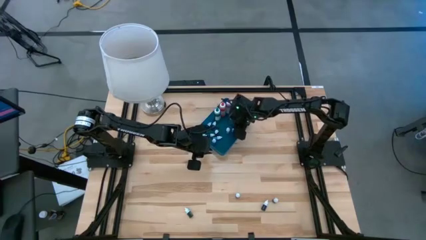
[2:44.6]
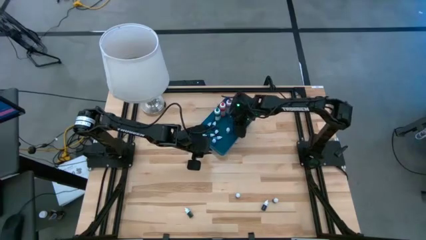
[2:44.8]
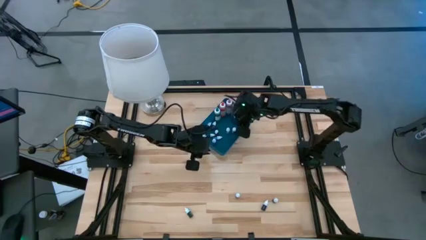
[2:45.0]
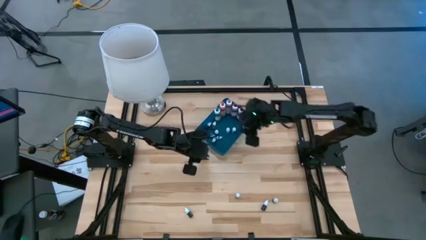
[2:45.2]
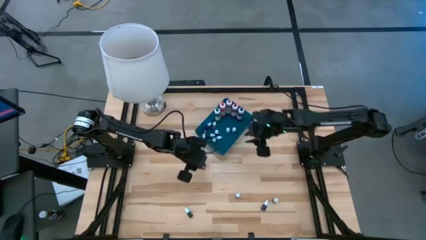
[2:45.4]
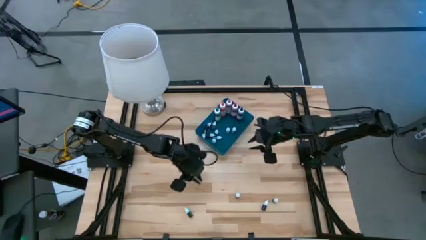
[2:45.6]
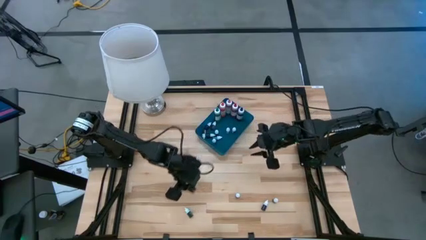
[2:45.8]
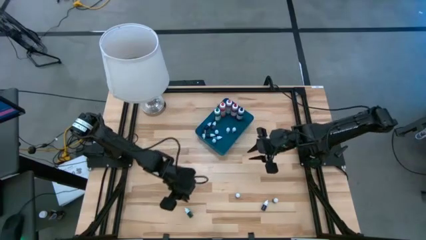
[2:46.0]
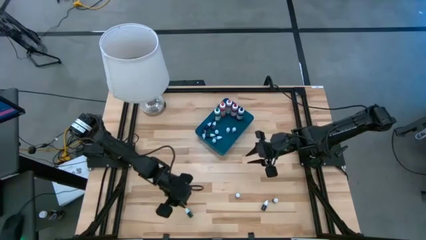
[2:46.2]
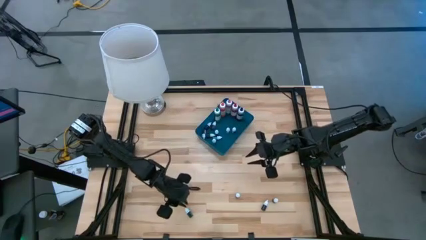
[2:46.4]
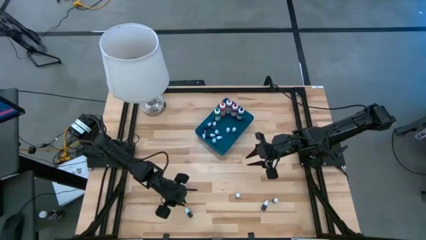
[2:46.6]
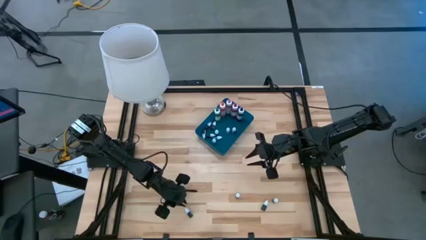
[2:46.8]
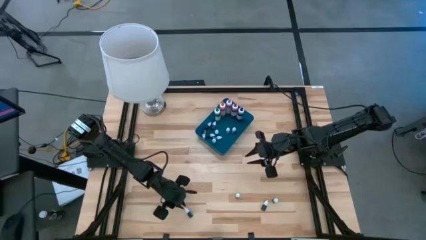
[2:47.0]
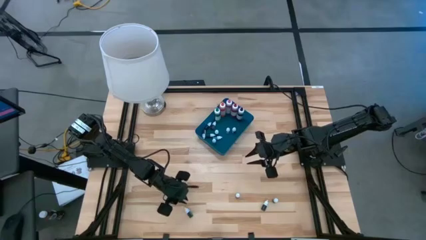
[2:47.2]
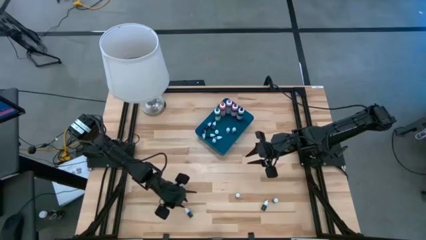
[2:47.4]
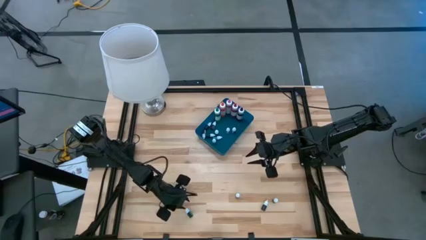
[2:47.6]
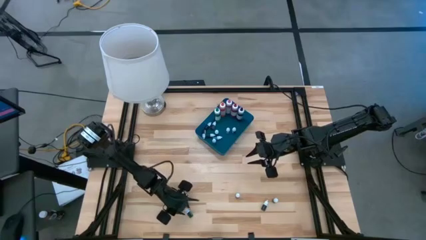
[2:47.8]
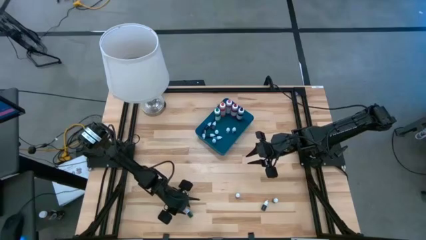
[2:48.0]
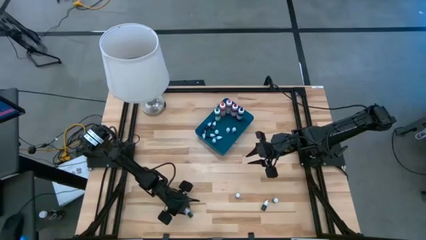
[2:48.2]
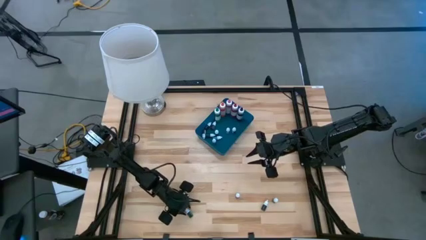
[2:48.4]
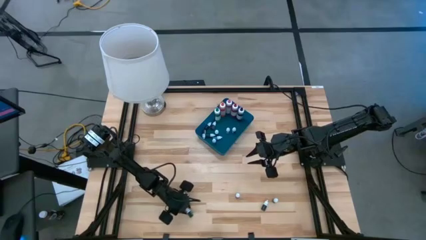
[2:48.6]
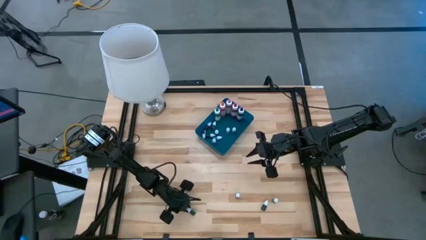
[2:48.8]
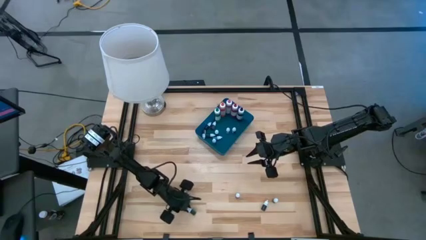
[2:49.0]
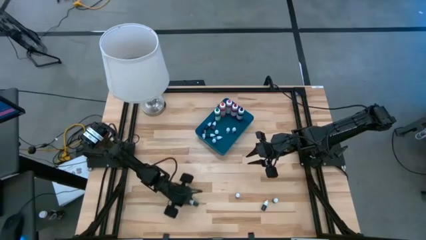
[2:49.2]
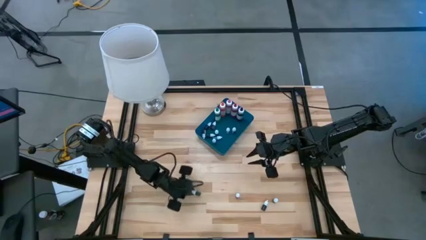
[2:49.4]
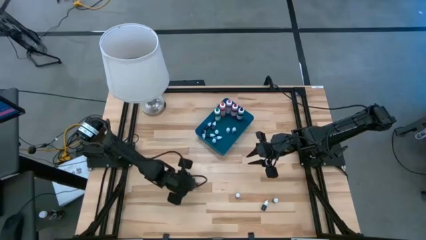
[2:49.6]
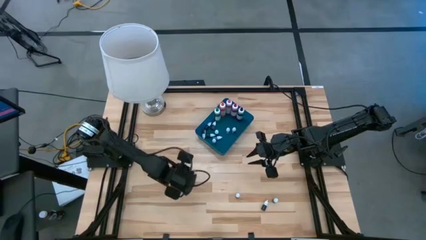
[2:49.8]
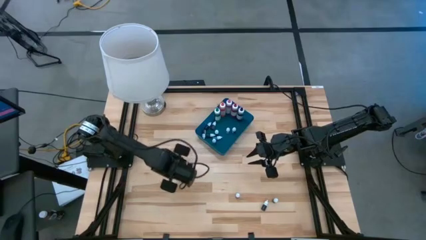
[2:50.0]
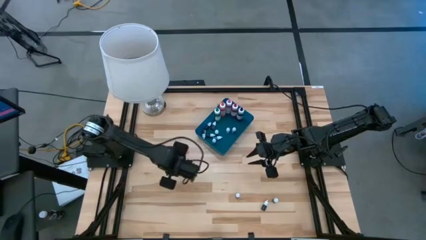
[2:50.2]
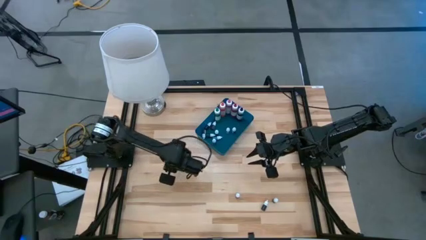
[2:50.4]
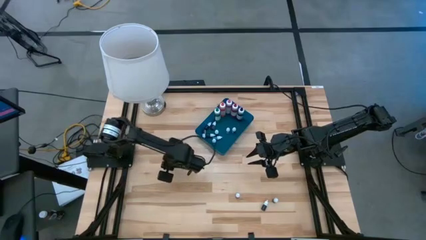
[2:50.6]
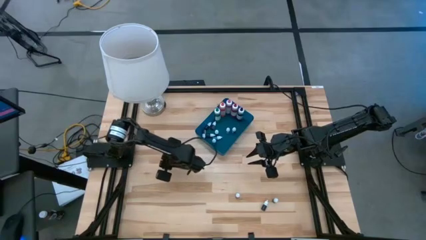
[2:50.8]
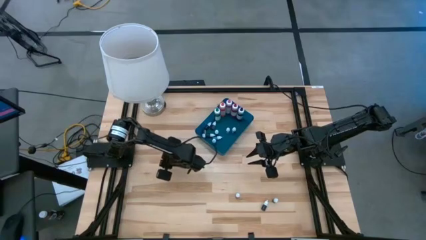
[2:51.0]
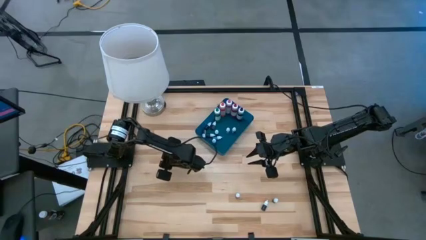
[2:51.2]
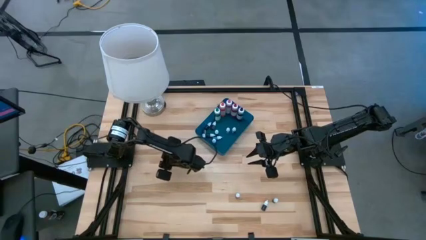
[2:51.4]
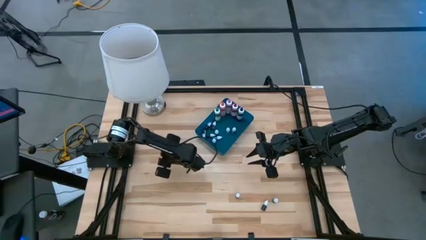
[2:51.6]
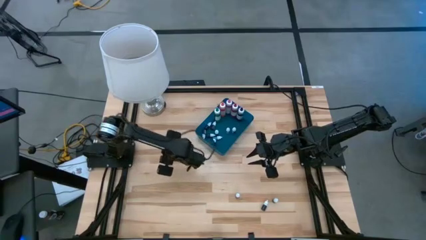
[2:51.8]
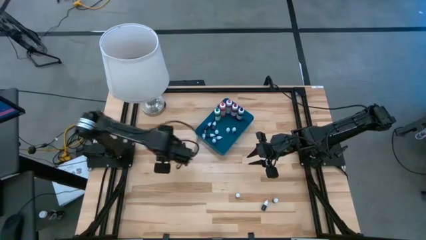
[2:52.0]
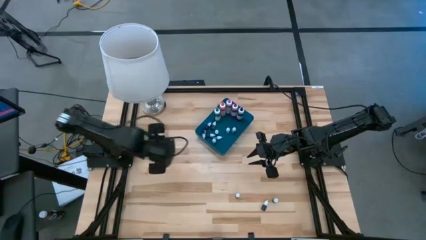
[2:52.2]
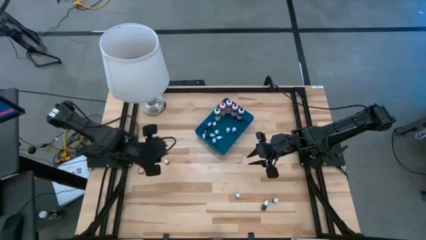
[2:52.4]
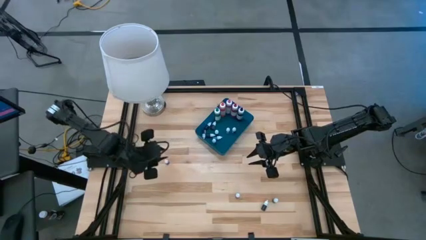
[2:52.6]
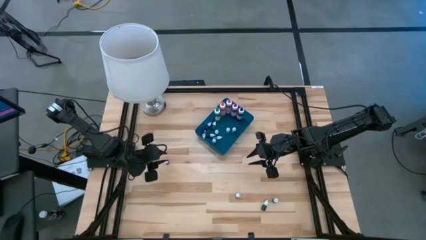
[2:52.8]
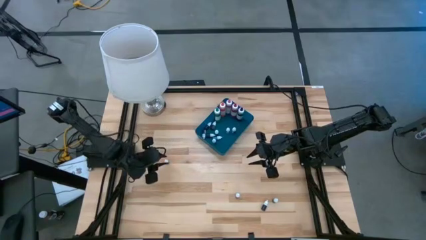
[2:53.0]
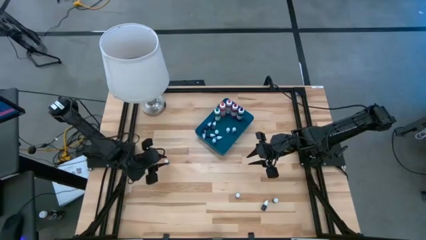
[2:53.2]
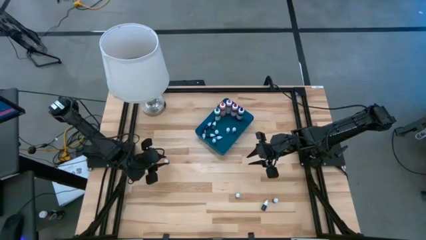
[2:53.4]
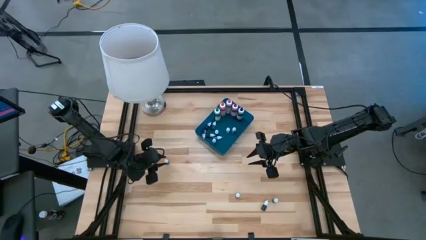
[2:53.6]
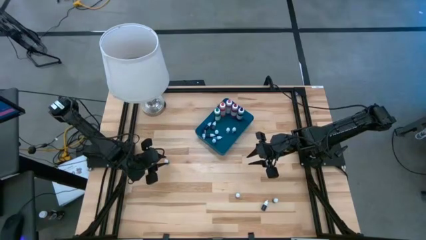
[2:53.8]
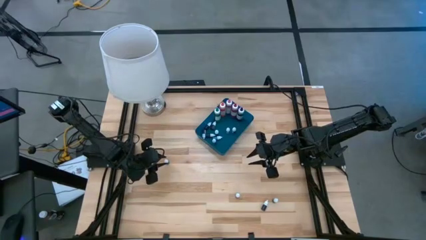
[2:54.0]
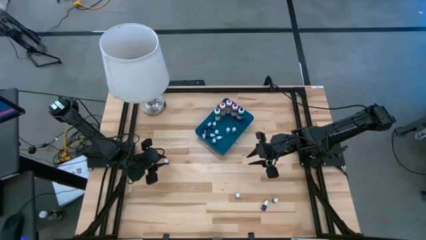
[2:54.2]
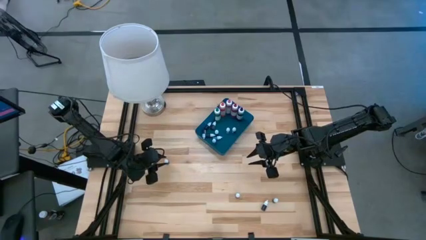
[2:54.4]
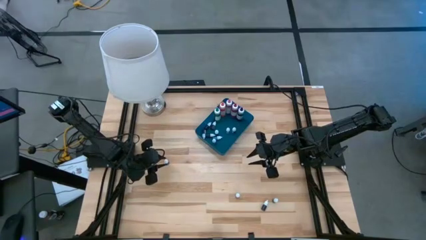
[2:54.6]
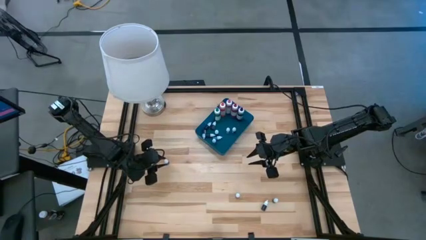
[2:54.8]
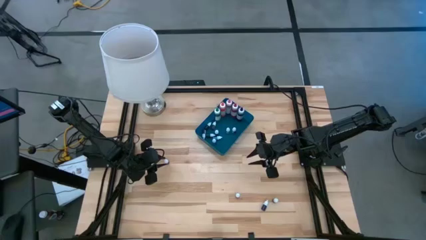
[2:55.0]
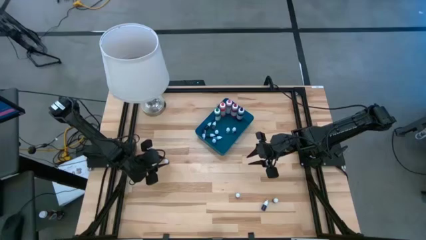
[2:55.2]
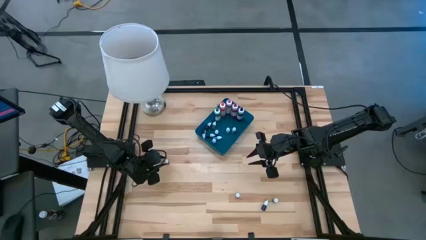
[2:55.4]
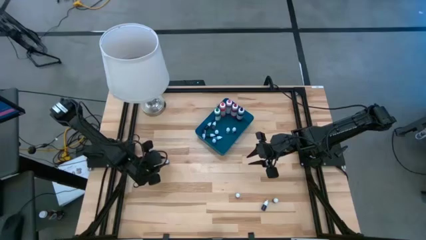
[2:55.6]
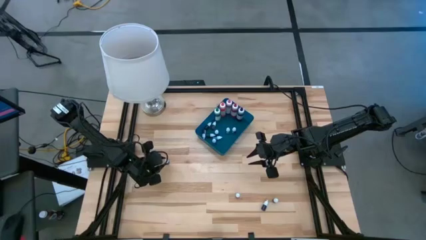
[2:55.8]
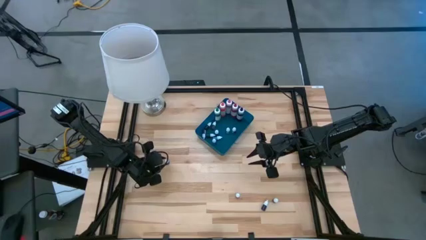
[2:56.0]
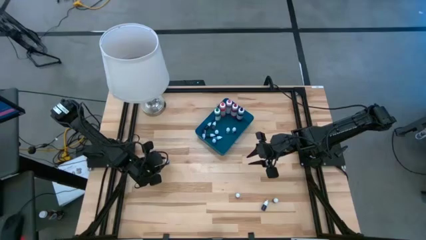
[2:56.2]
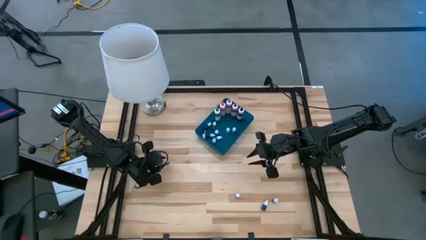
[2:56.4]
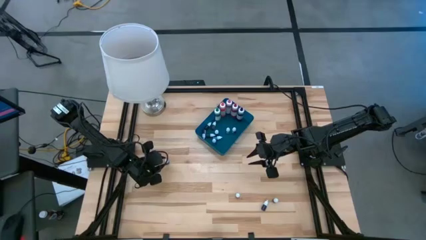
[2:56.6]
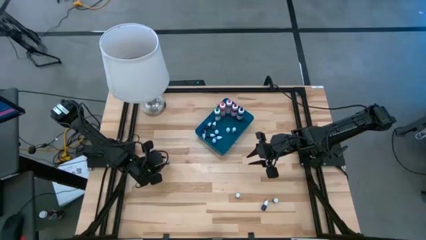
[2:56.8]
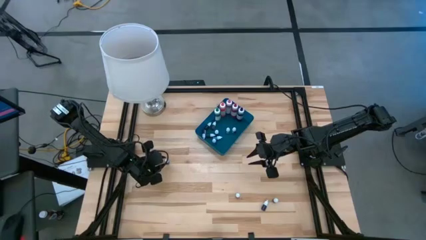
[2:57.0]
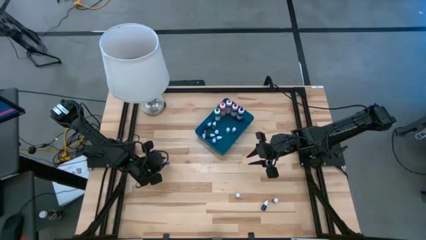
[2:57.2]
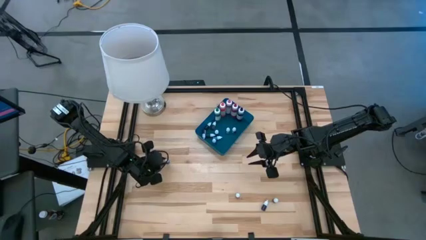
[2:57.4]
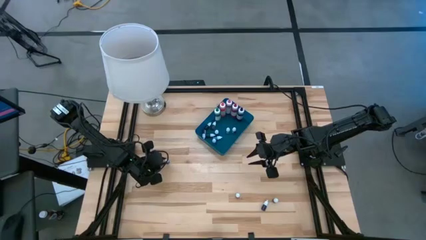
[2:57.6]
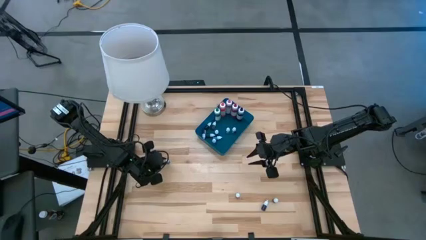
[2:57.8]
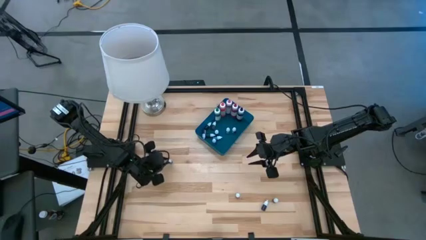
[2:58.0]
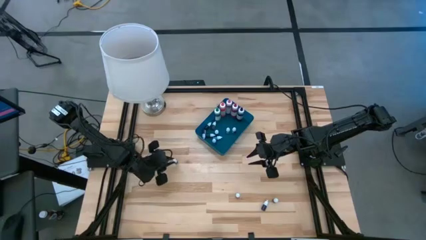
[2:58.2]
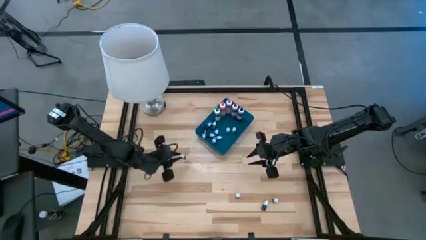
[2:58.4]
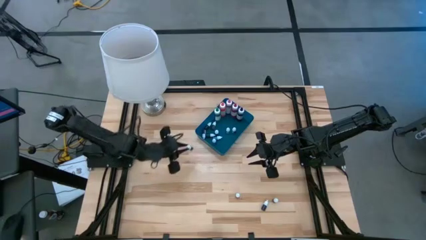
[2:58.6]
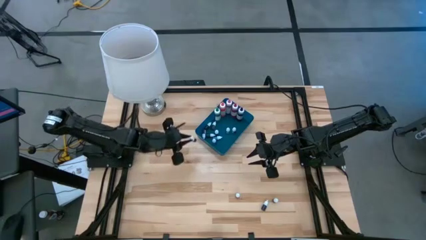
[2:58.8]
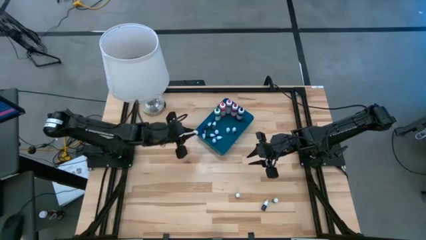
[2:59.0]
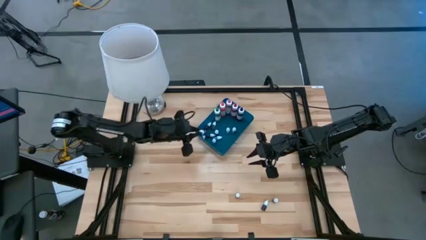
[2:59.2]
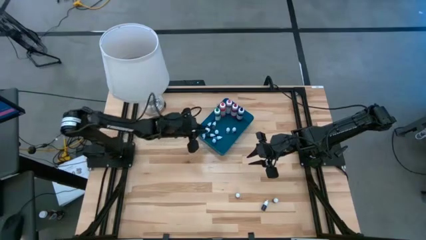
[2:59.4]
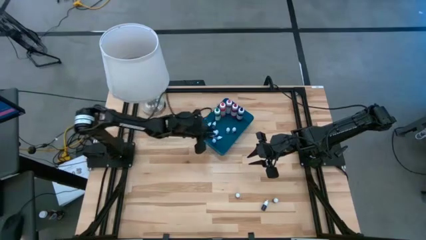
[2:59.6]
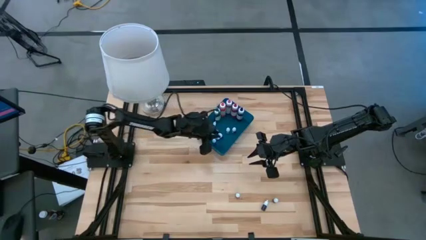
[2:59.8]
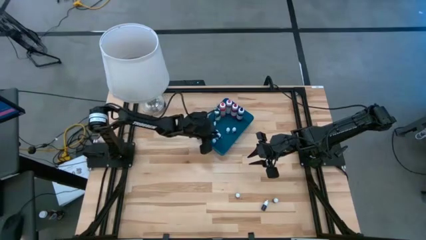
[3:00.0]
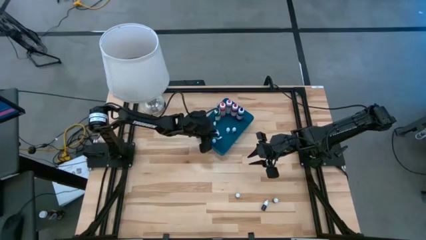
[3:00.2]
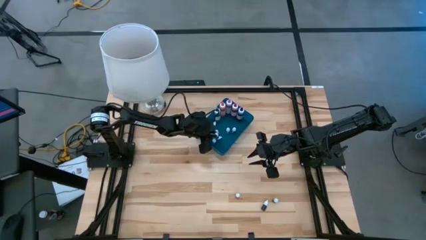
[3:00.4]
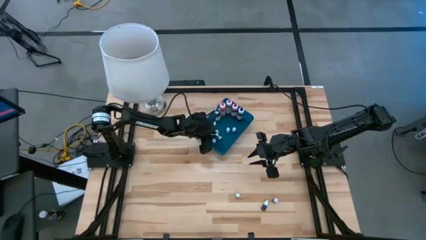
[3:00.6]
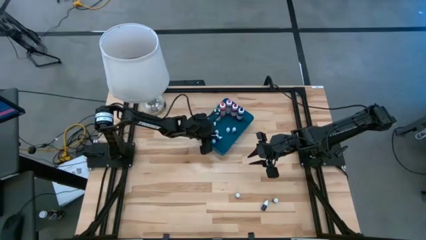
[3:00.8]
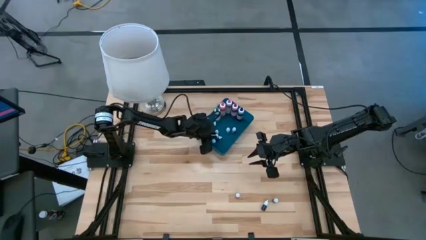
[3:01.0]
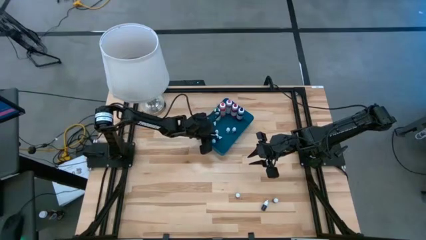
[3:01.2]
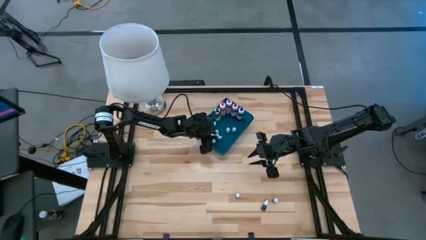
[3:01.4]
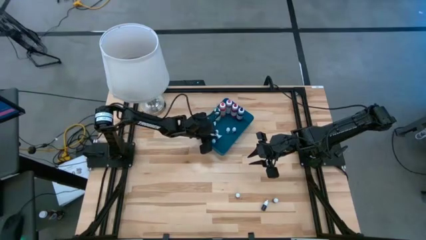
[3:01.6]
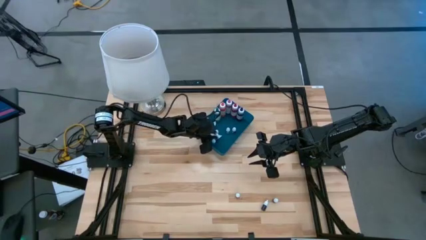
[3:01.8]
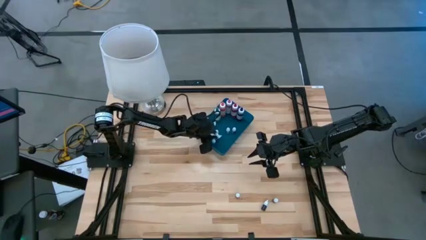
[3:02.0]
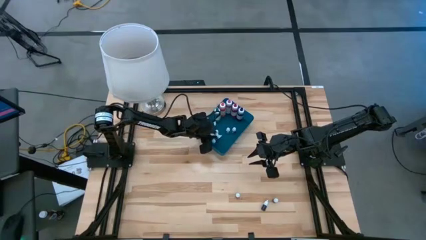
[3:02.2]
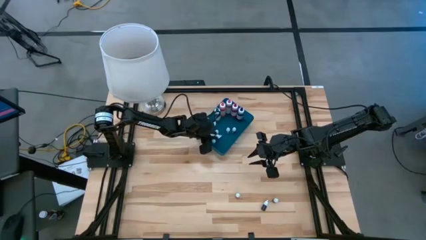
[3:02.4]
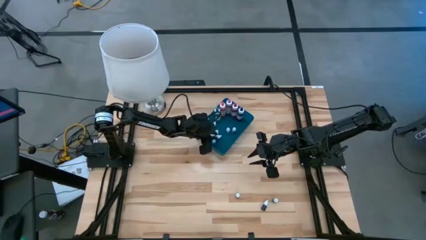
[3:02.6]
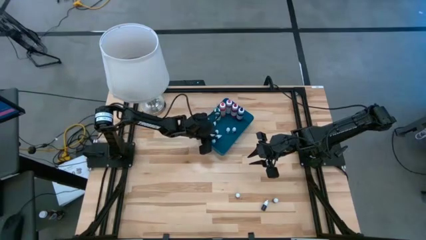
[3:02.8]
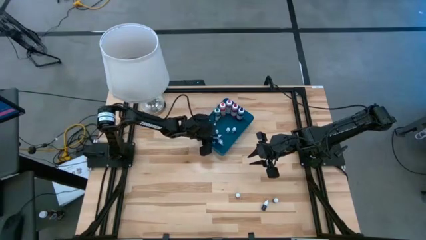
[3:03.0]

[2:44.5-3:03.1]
Task: Pick & Place food coloring
Put the small green food coloring bottle into the blue container
